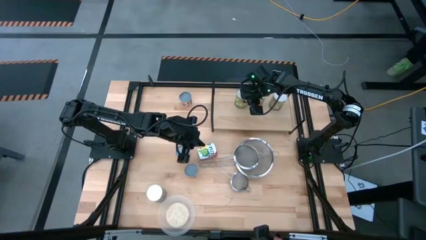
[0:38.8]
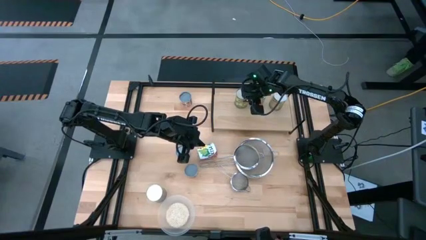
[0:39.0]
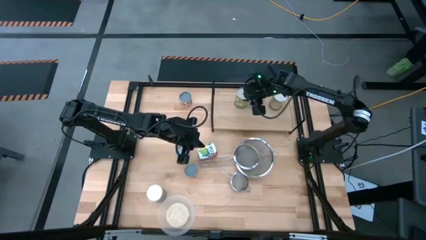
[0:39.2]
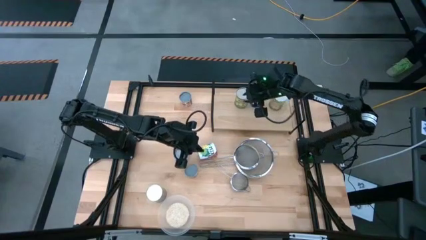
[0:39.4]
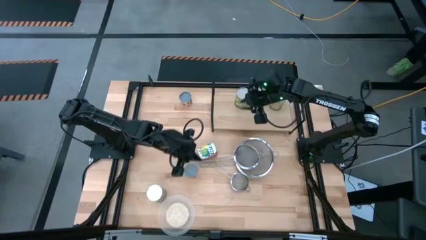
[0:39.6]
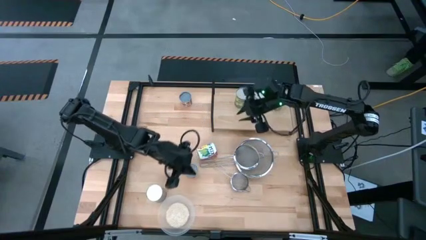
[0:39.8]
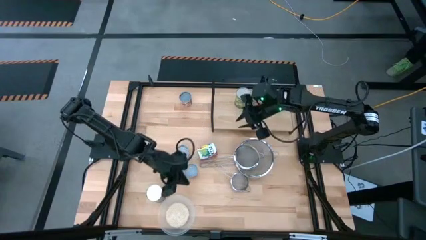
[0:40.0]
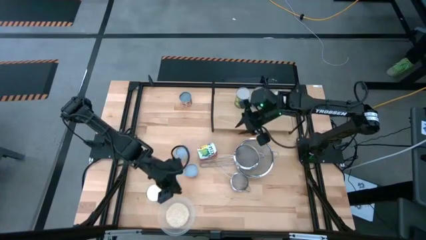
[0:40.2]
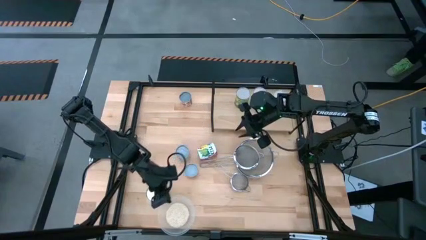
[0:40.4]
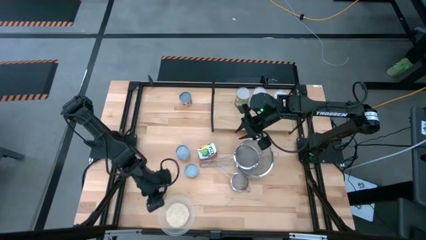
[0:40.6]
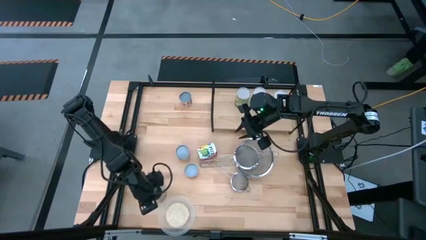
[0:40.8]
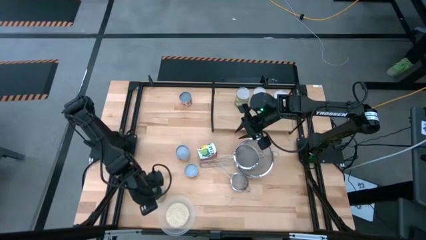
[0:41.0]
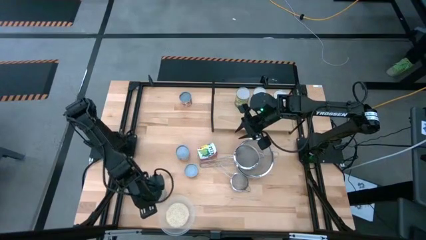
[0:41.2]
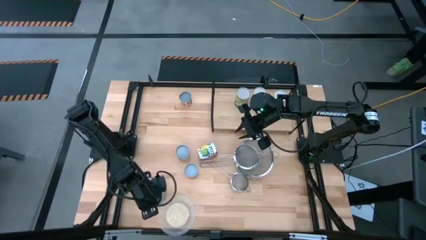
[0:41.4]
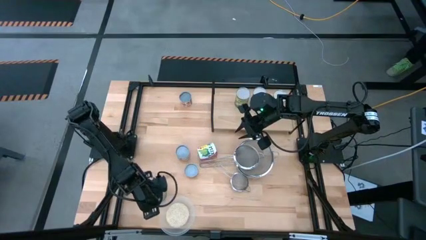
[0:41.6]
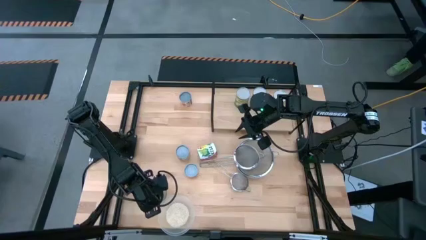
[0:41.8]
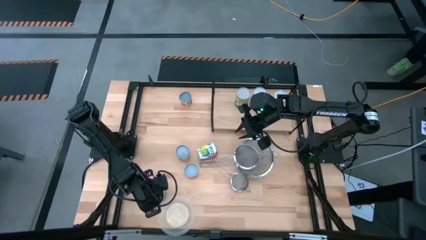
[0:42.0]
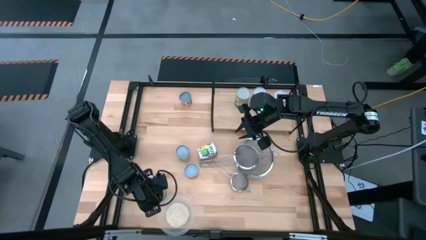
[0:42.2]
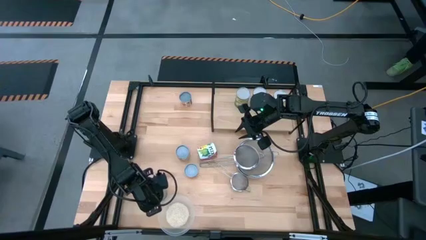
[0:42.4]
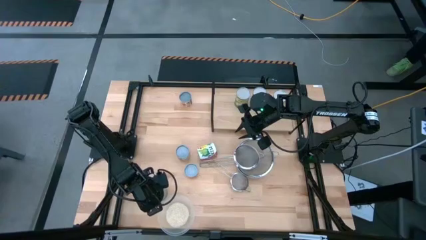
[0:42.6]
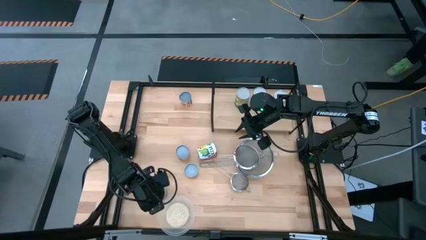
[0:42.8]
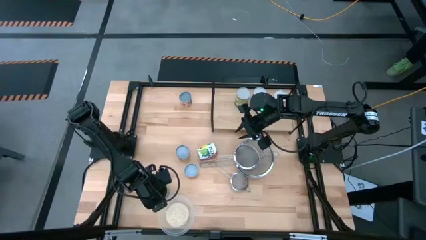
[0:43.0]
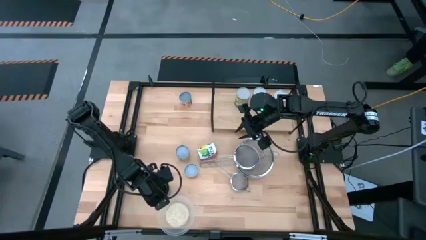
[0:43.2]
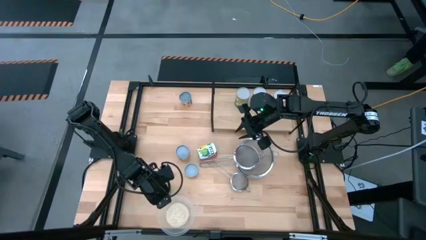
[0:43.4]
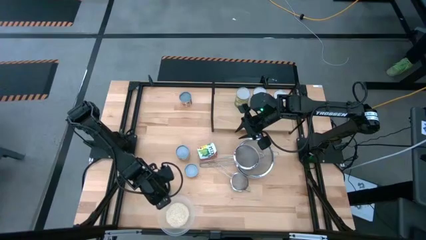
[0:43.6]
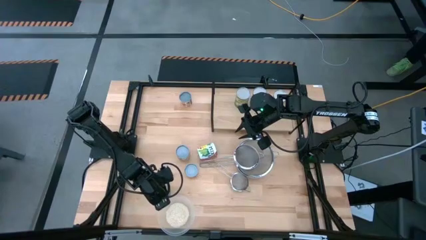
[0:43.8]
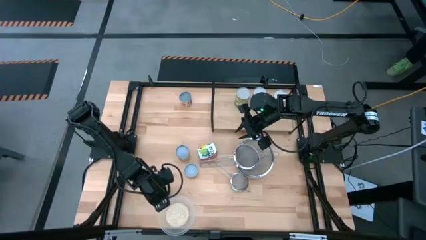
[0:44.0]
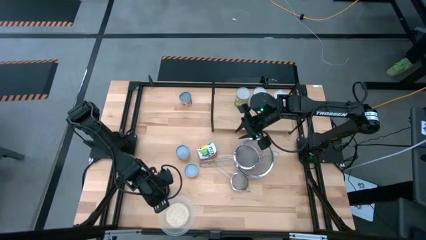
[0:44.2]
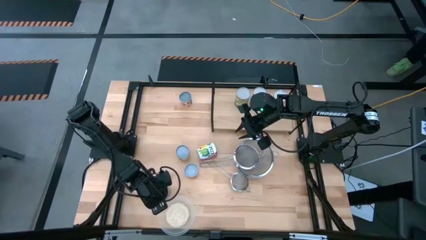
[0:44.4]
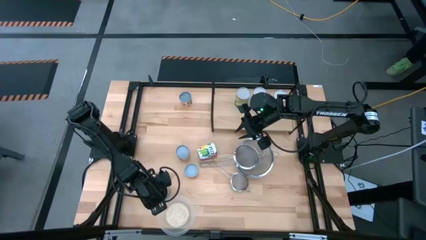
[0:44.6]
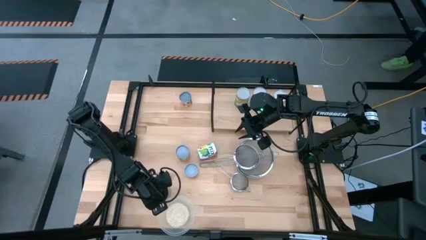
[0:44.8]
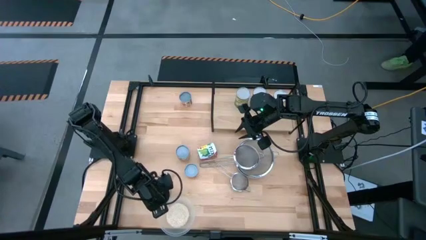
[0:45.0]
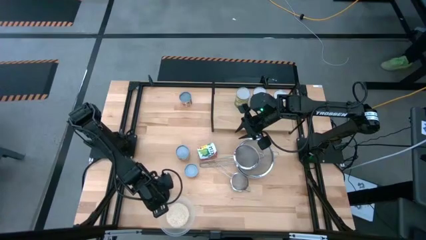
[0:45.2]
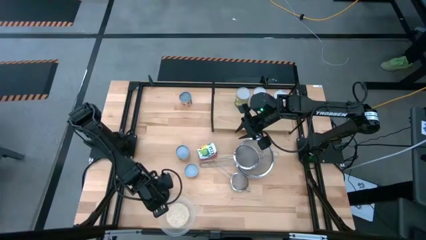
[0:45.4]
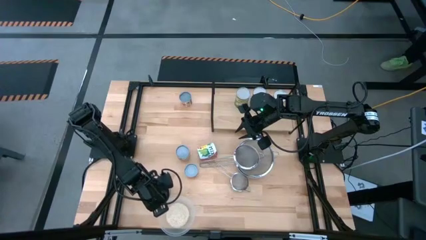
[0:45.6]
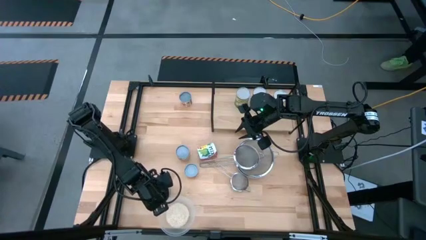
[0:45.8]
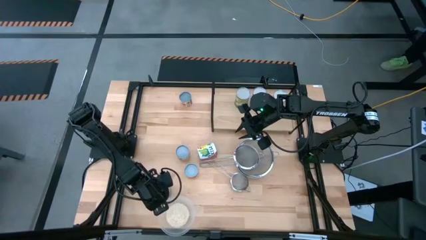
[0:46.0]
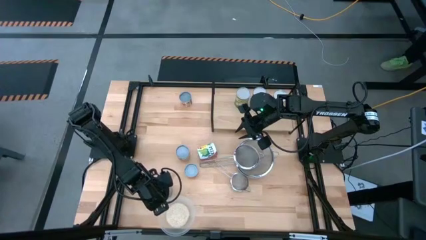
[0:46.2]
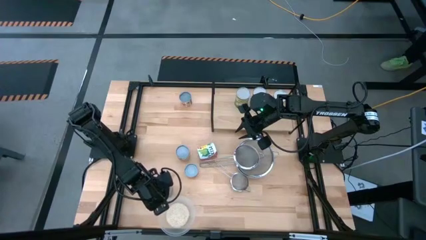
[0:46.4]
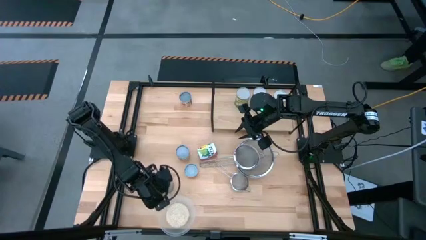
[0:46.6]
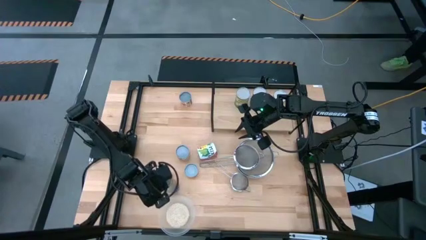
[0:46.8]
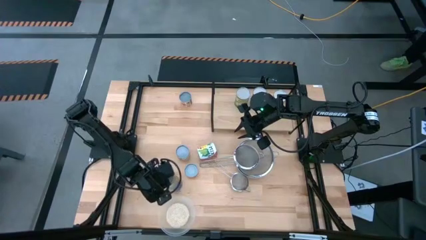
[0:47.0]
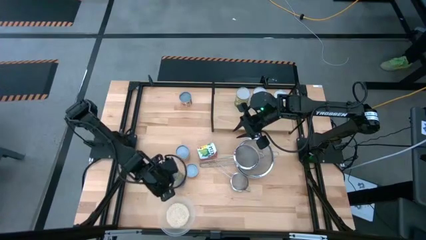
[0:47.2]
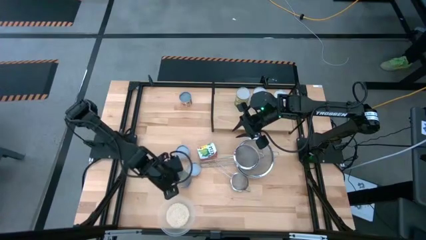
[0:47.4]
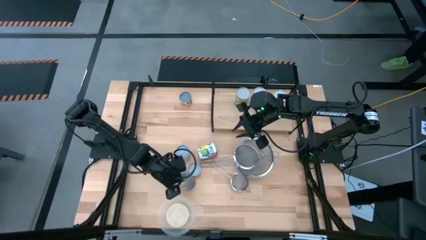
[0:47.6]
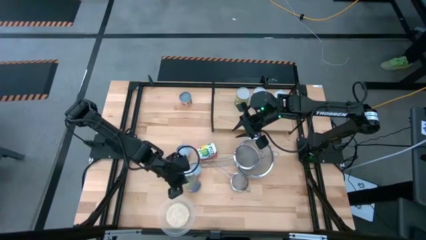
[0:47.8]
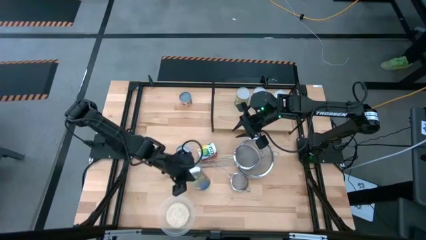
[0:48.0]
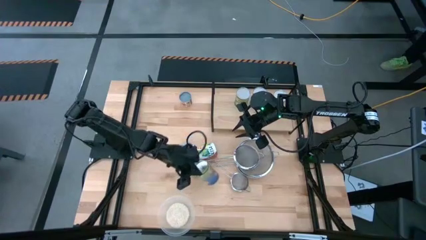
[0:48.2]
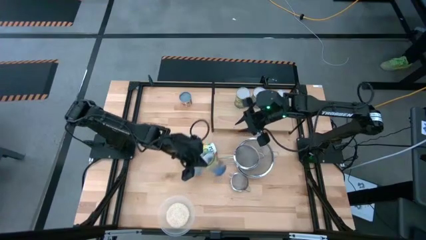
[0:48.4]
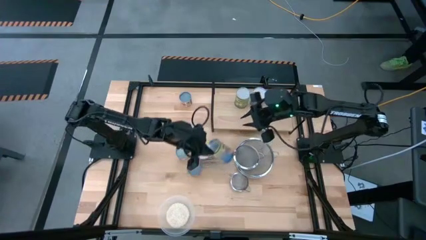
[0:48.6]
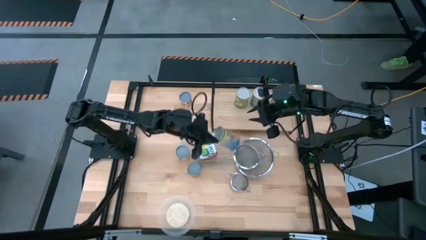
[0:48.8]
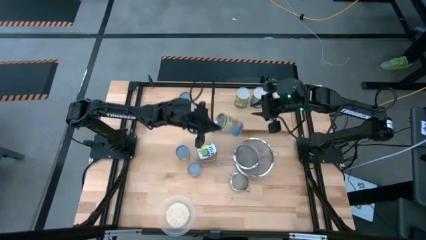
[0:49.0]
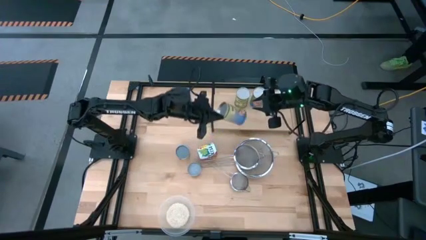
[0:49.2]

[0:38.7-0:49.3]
Task: Pick and place cans onto a shelf
Put the canned peaches on the shelf
